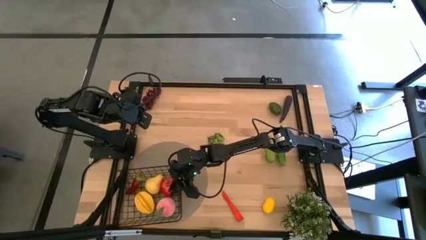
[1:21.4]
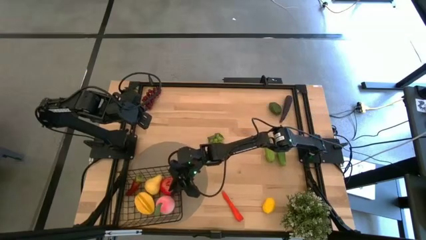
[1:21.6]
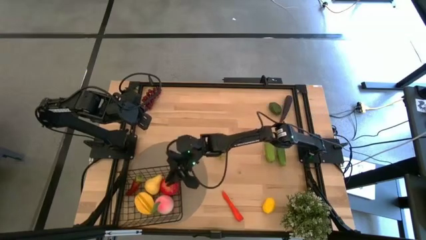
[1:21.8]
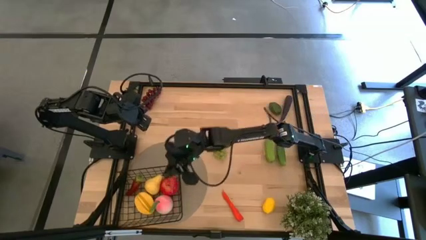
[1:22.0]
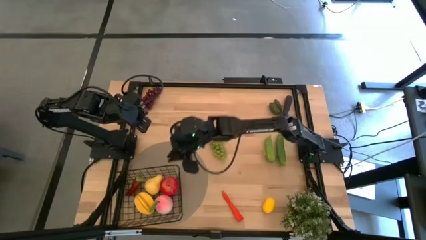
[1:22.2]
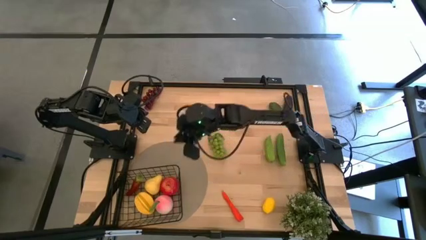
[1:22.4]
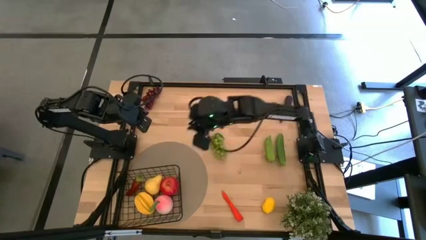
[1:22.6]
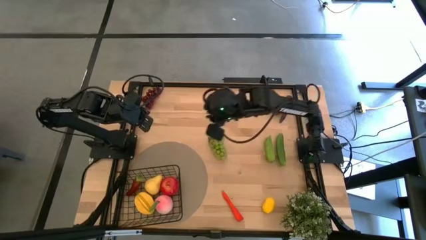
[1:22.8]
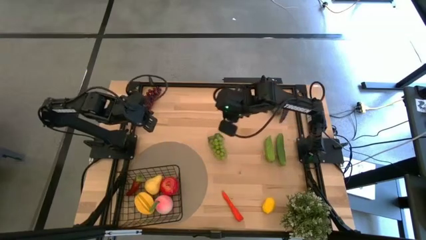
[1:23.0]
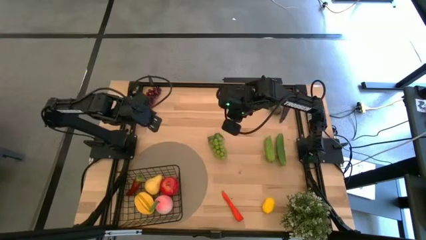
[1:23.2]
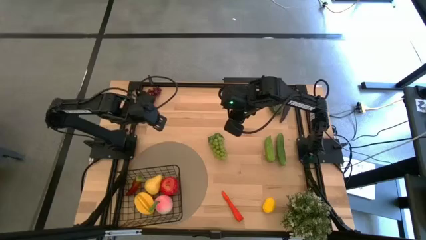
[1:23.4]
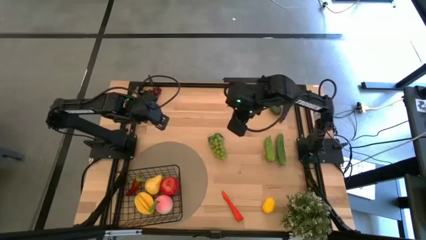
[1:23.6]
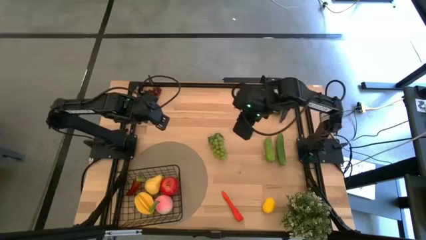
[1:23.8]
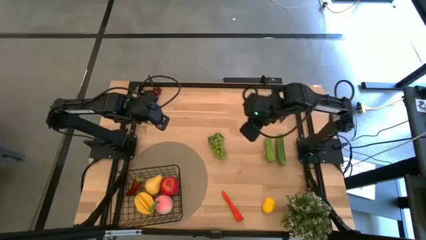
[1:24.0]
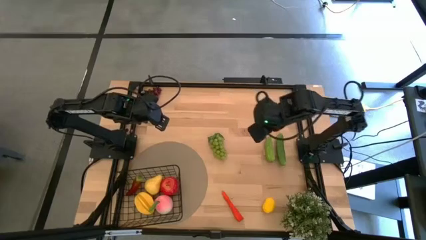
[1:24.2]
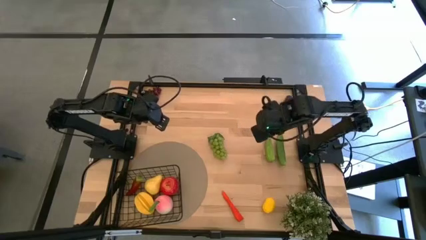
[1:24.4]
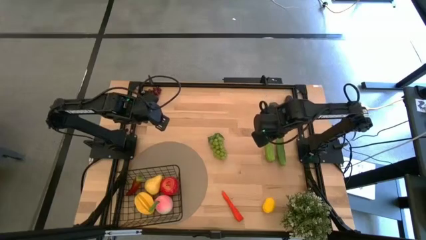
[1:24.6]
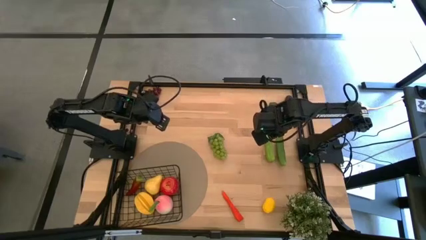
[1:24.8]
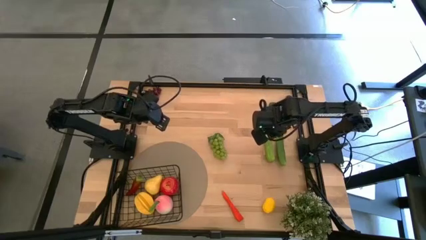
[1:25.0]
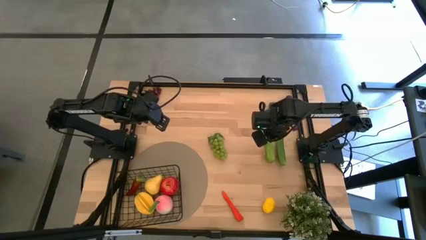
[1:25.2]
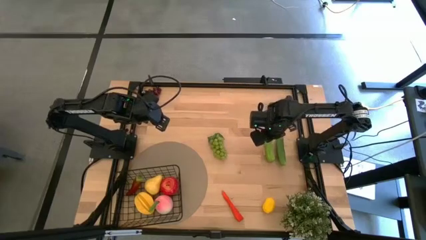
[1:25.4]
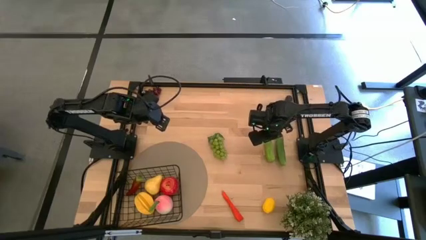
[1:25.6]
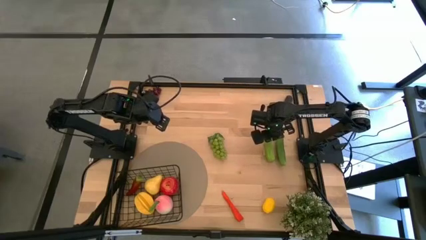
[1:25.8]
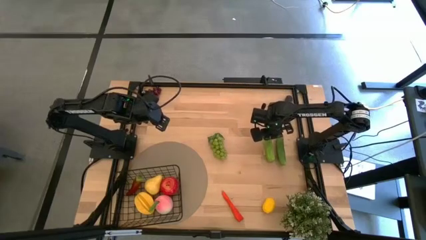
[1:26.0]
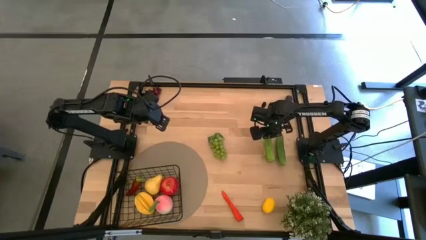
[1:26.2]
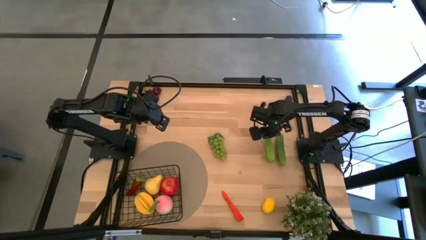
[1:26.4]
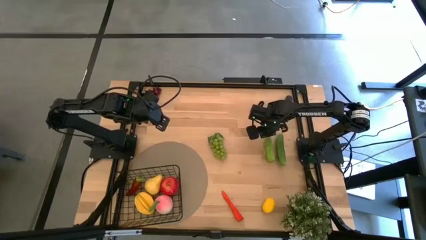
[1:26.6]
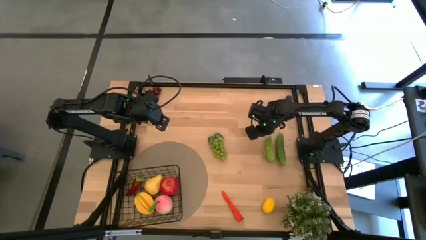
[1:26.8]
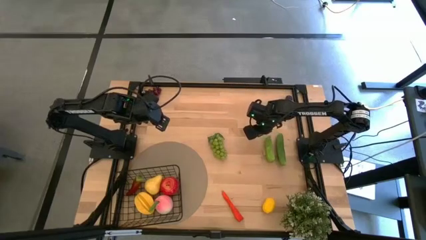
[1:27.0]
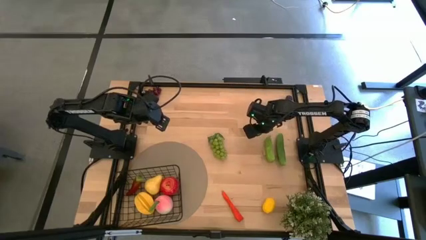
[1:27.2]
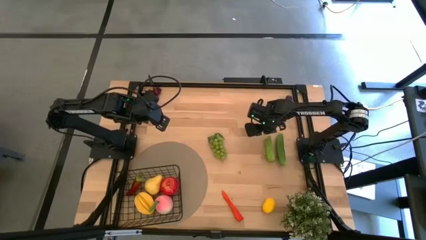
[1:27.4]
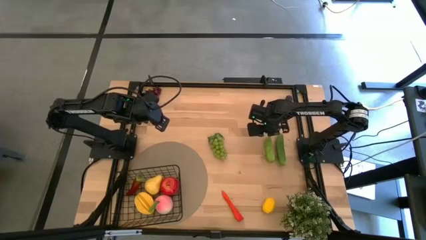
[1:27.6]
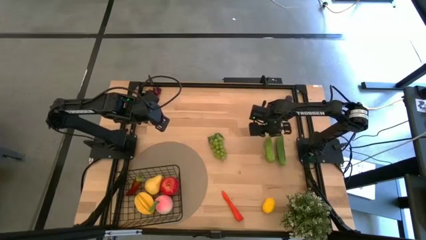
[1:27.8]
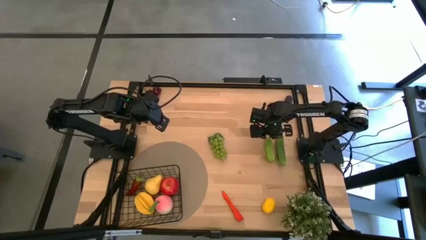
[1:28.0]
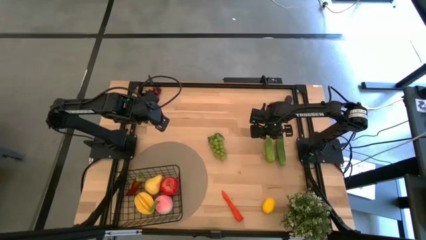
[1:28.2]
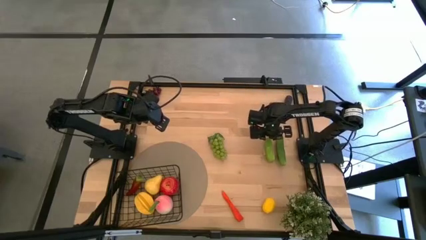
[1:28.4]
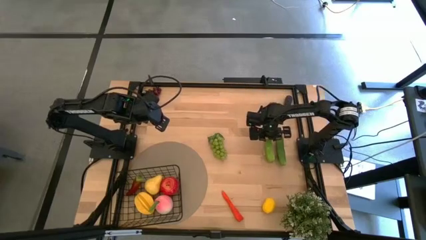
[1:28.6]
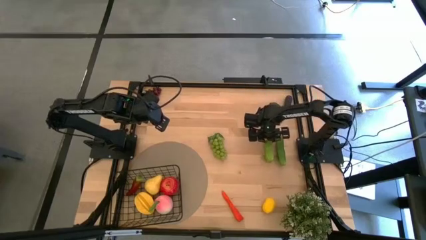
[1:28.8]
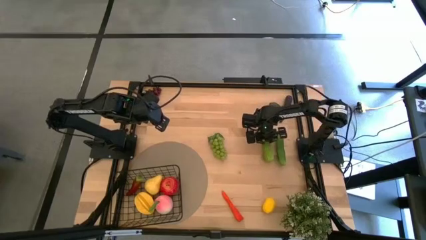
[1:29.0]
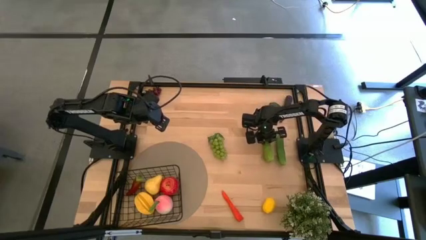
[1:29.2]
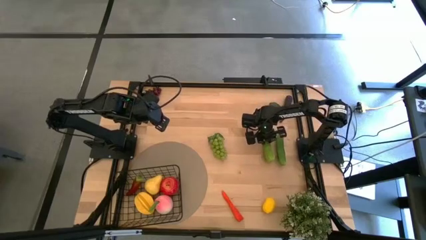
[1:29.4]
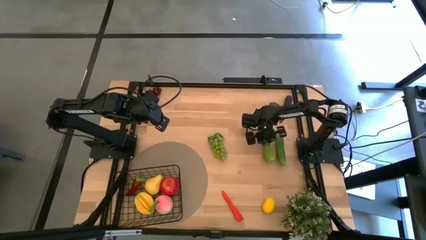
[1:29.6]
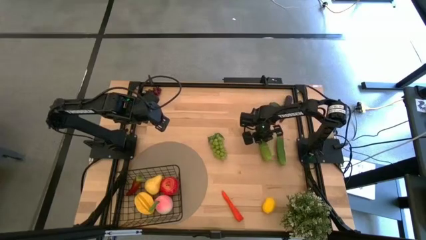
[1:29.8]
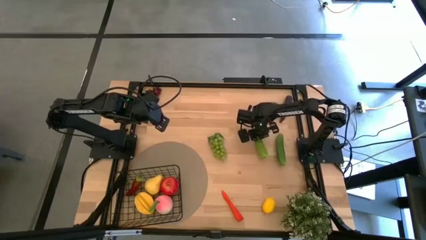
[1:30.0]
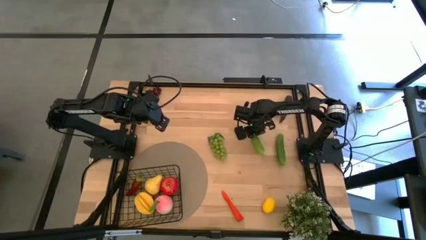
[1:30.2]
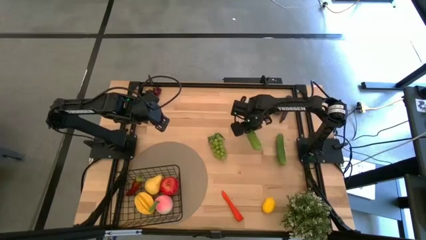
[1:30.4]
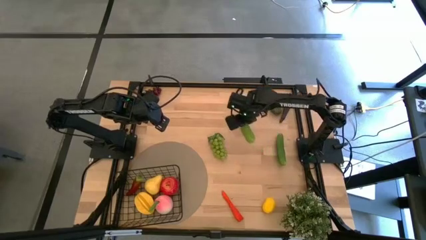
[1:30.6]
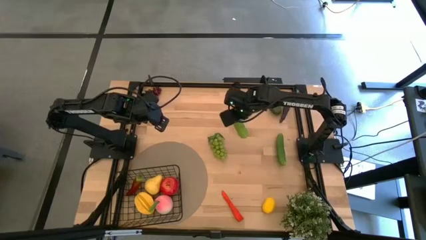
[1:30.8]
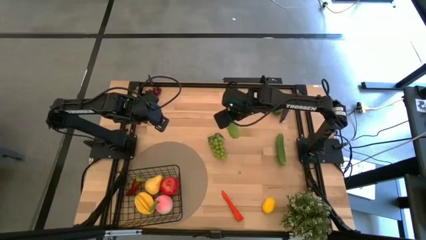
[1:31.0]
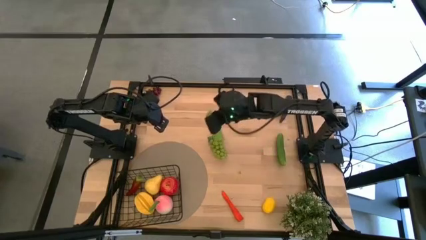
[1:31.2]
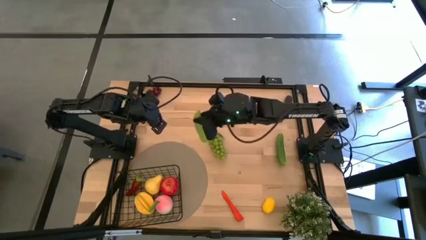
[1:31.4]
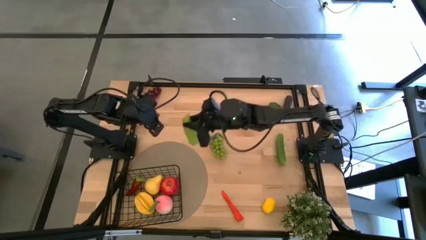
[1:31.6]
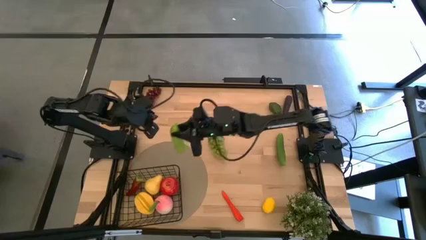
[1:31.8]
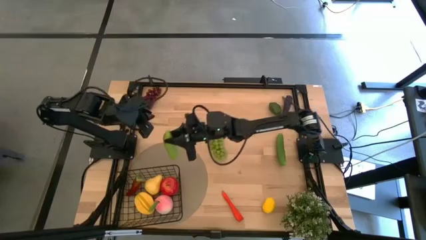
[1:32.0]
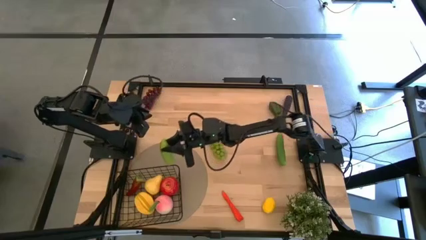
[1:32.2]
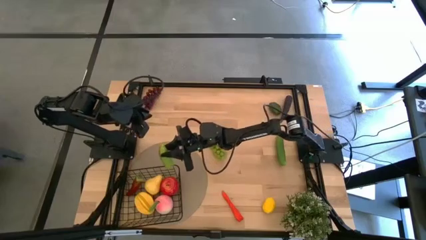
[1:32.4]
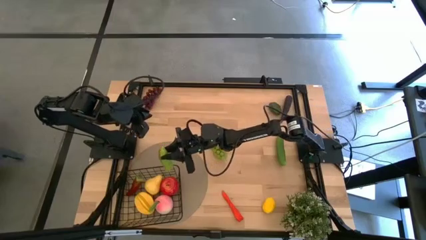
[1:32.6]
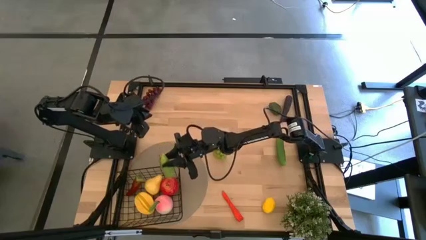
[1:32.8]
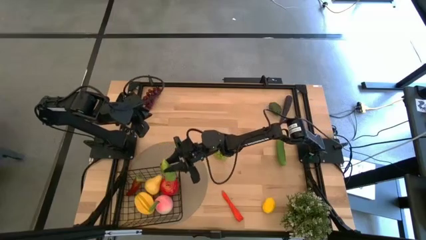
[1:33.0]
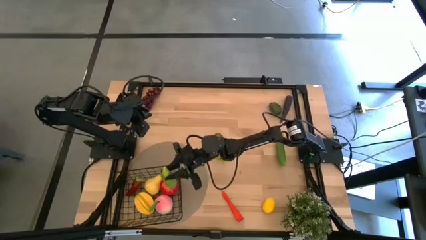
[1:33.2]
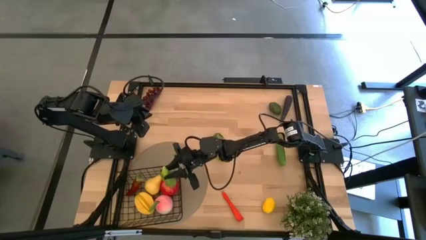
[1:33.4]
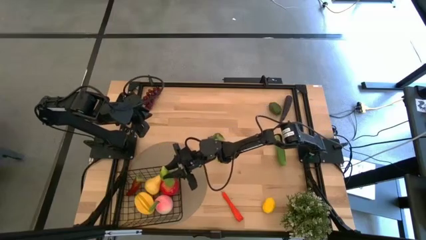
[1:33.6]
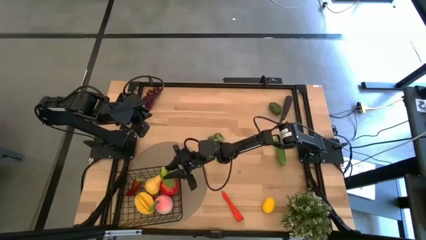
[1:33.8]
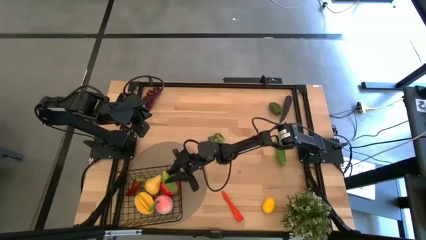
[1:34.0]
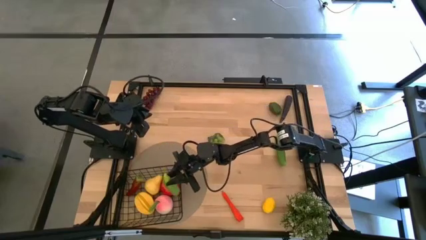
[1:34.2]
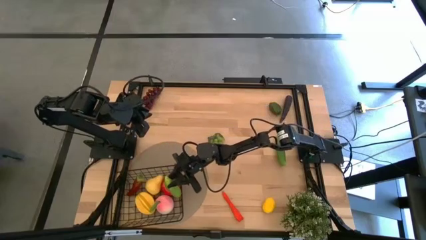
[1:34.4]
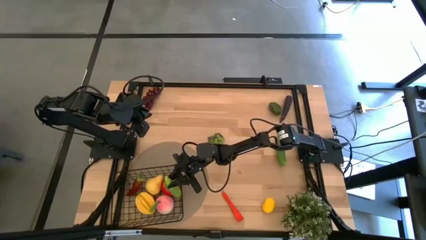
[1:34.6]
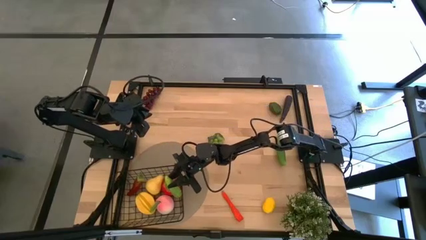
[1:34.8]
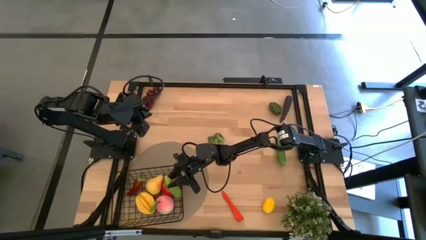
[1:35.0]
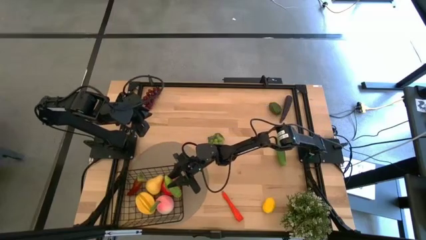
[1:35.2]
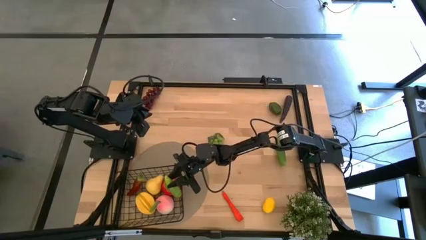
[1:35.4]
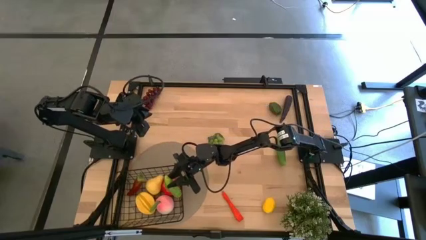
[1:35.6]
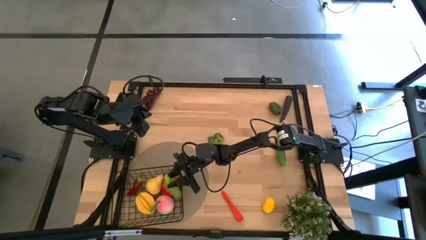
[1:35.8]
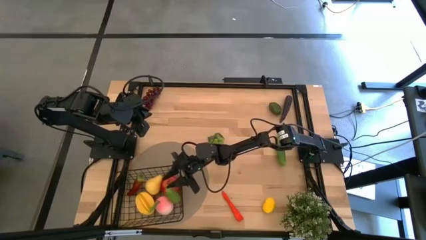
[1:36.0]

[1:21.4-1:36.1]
Task: Build produce basket
Put the left green cucumber into the wire basket
